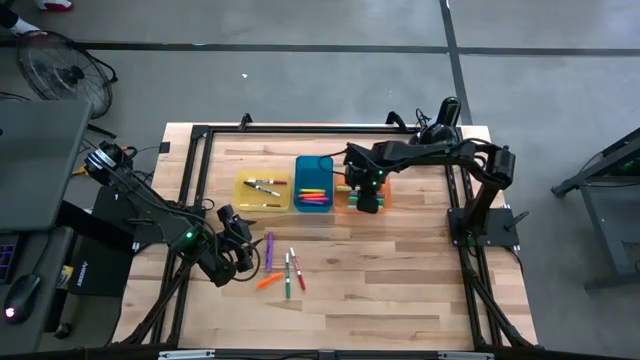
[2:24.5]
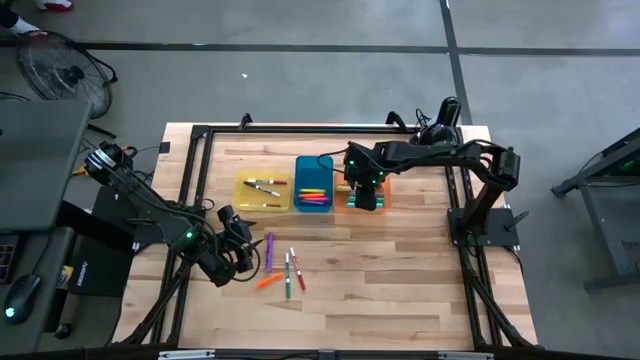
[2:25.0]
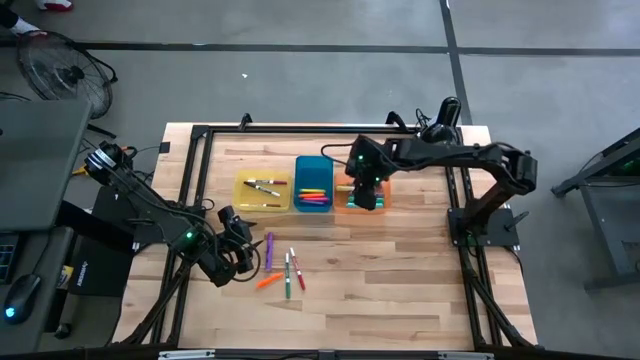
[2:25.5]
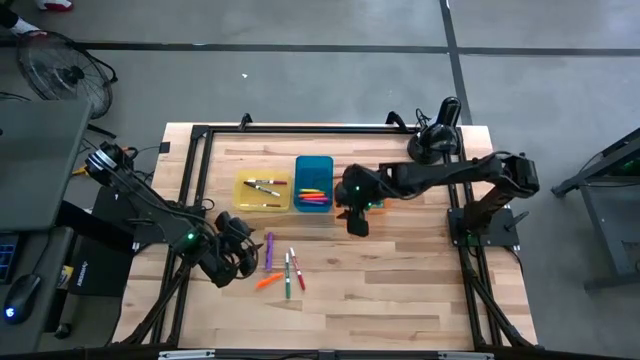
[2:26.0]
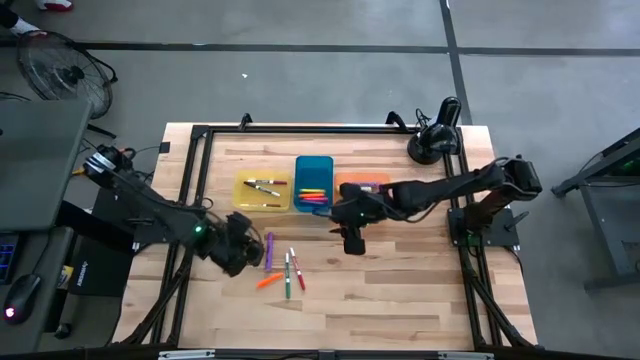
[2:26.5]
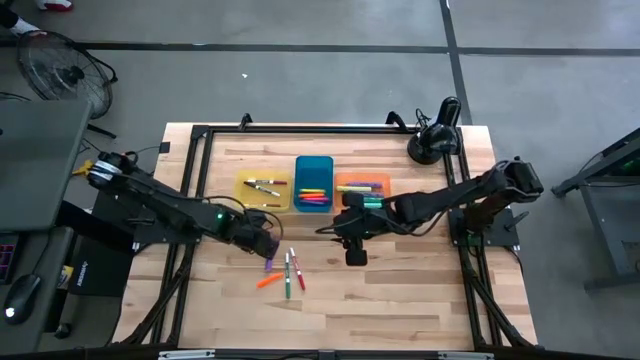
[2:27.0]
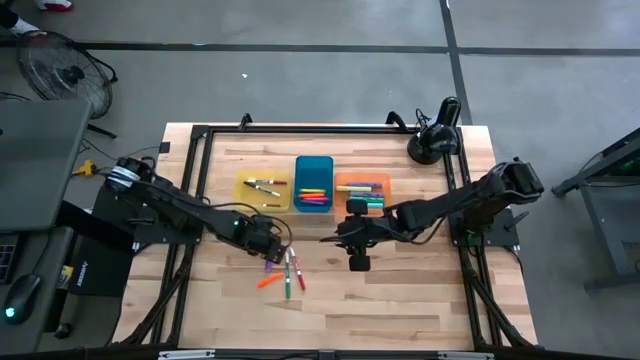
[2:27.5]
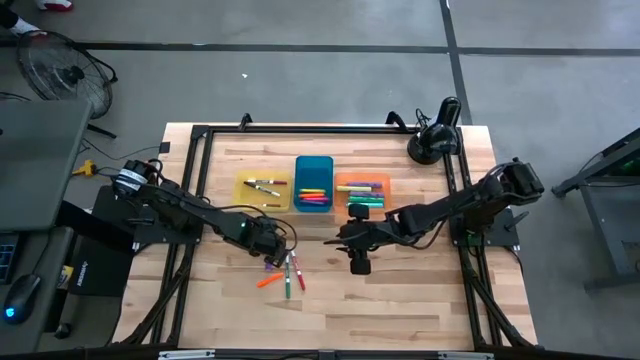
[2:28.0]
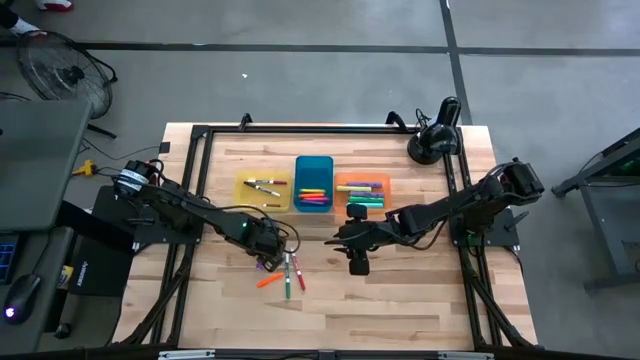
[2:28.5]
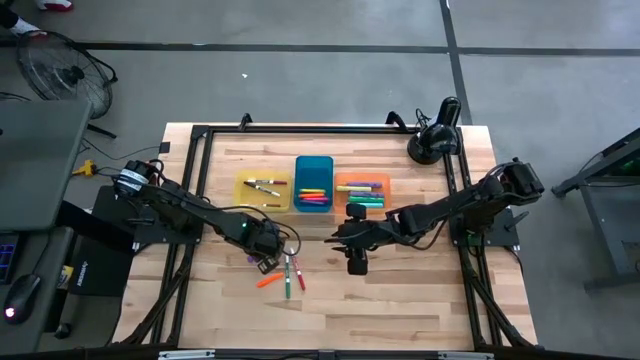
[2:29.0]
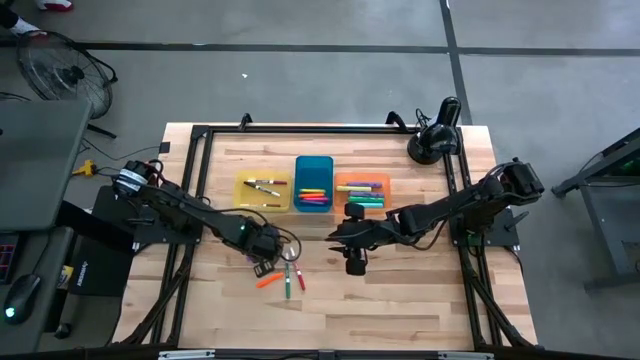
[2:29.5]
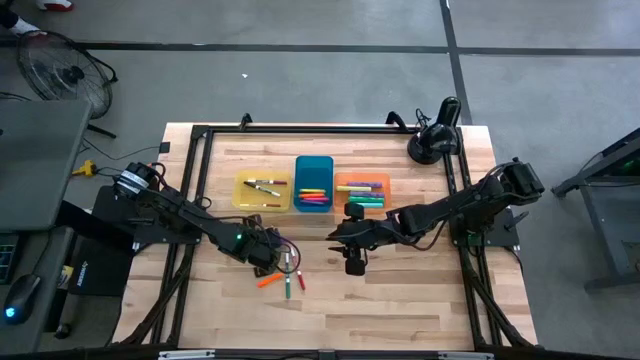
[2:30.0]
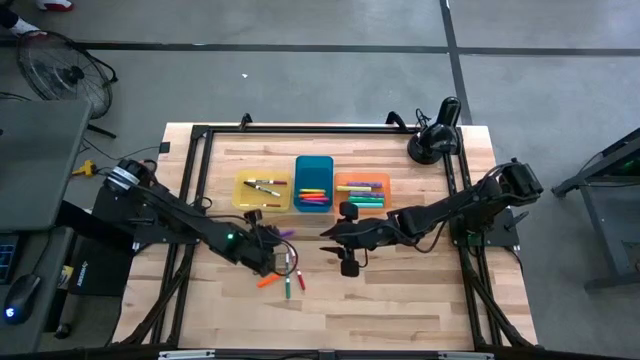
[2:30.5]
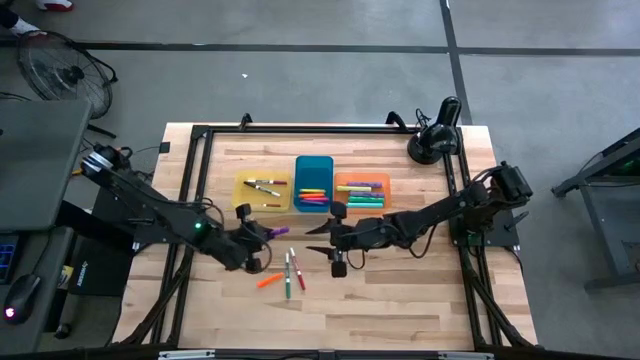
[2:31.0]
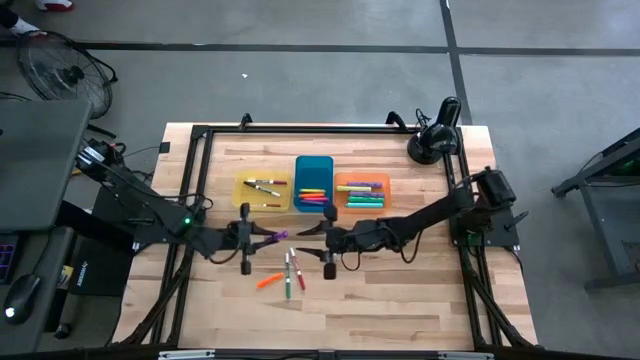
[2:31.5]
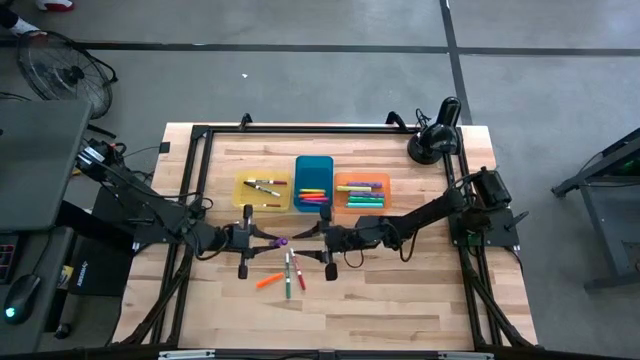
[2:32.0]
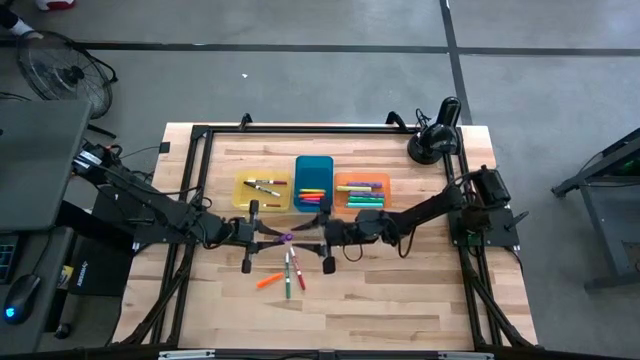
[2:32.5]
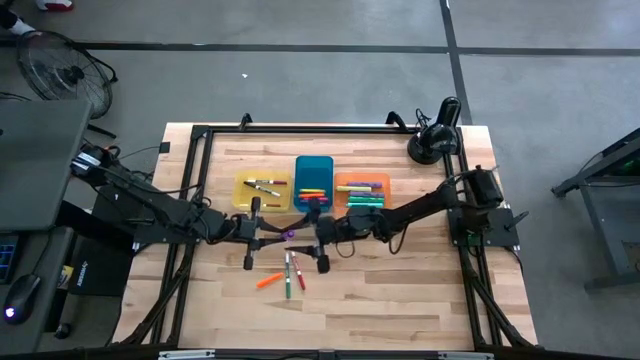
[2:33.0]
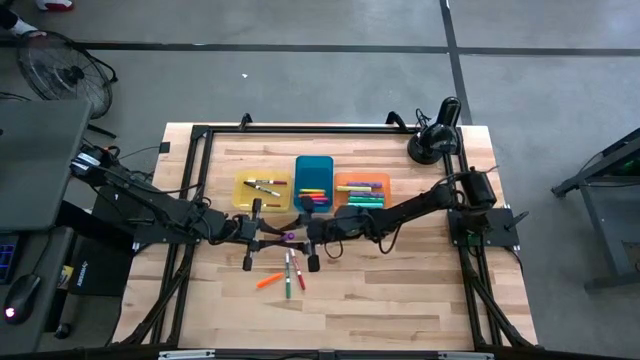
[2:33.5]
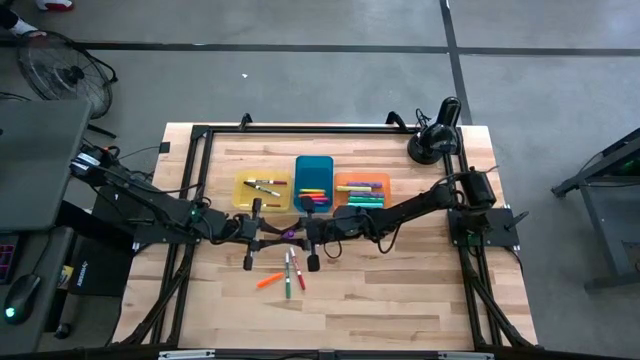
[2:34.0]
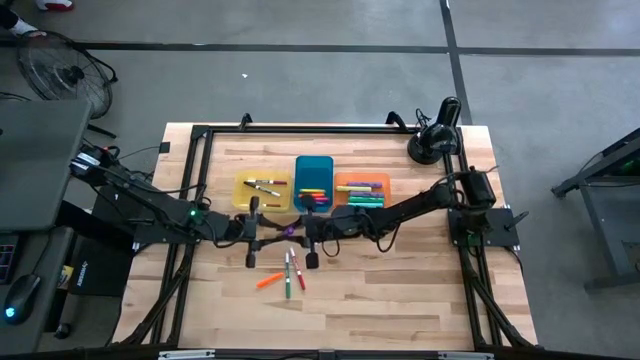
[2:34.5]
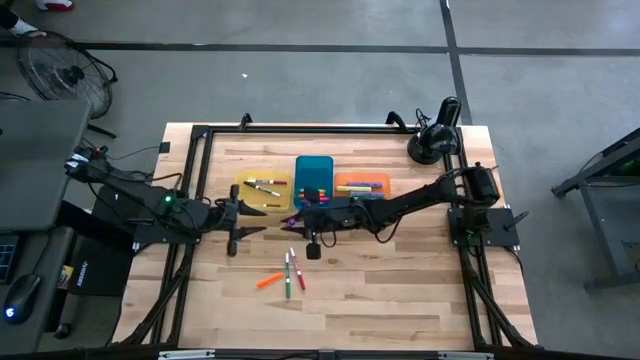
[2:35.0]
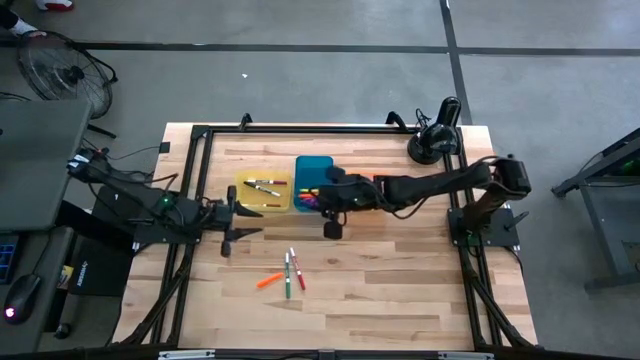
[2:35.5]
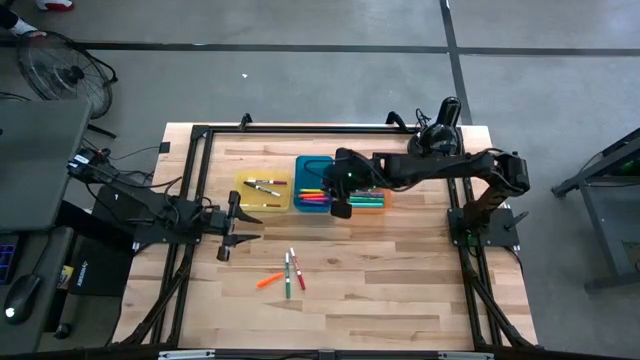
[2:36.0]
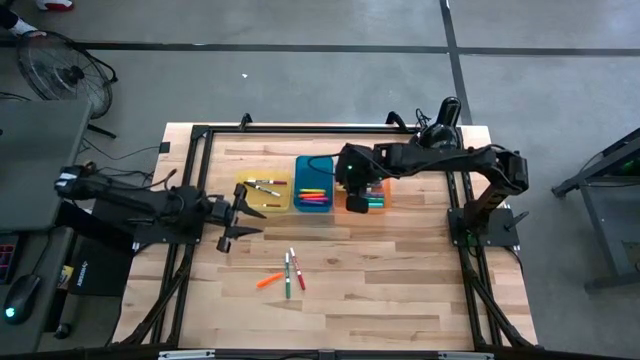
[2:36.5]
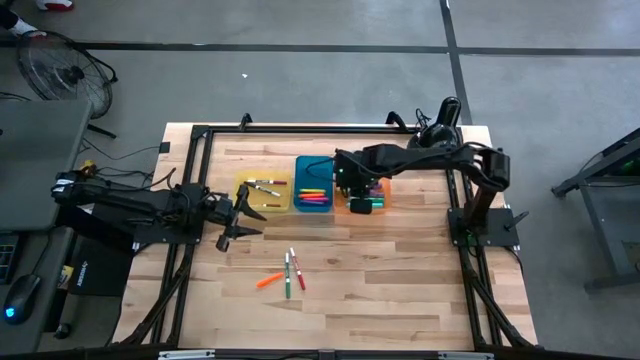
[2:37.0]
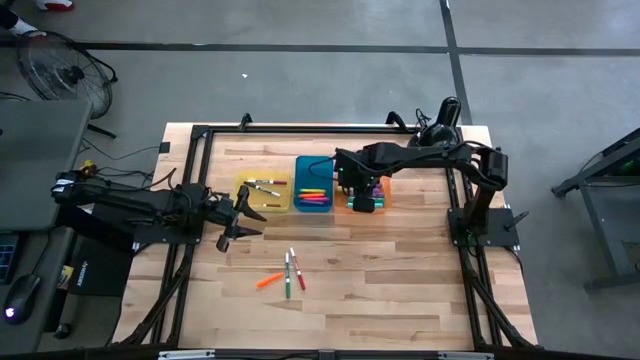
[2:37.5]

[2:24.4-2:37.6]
Task: Pick & Place Markers
Put the dark violet highlighter into the orange bin

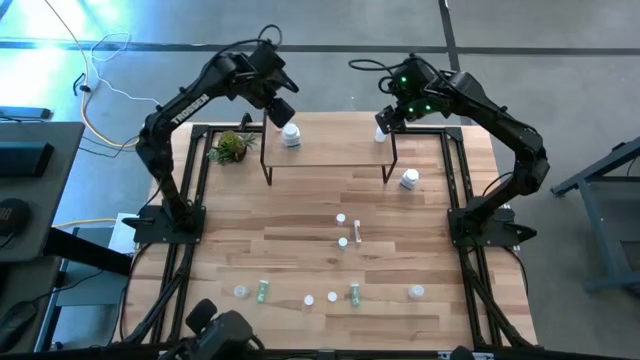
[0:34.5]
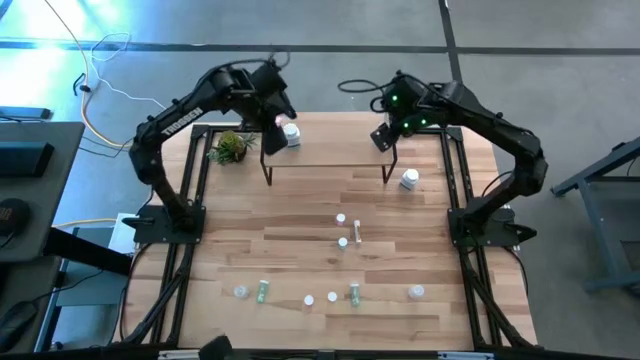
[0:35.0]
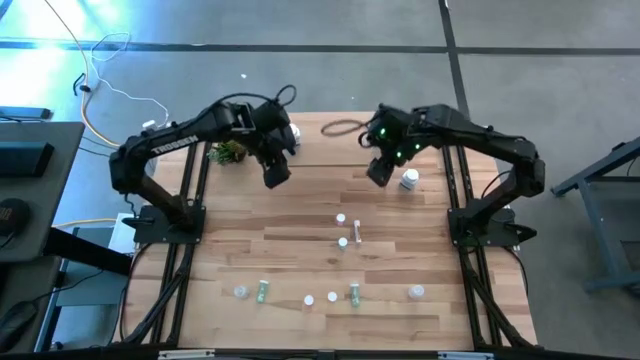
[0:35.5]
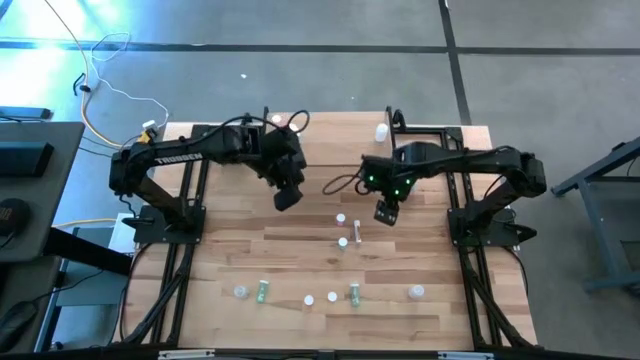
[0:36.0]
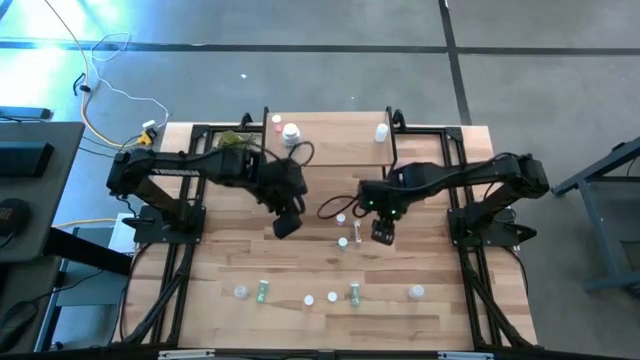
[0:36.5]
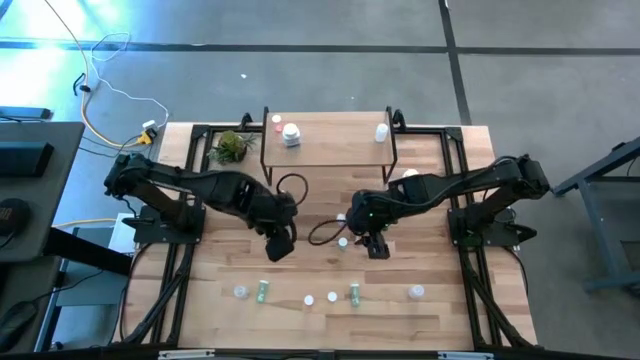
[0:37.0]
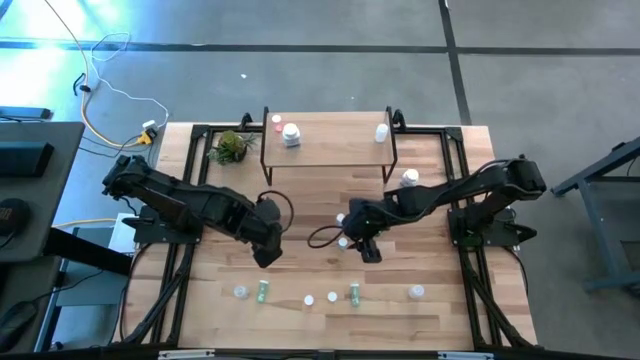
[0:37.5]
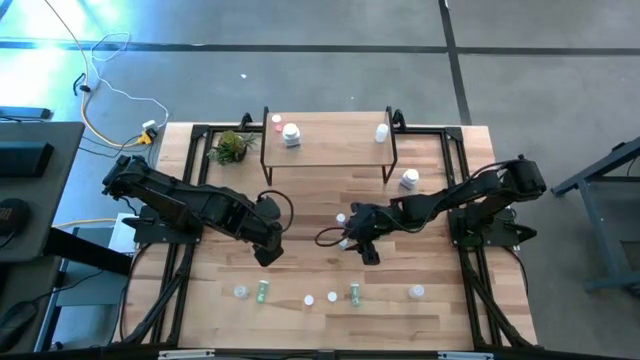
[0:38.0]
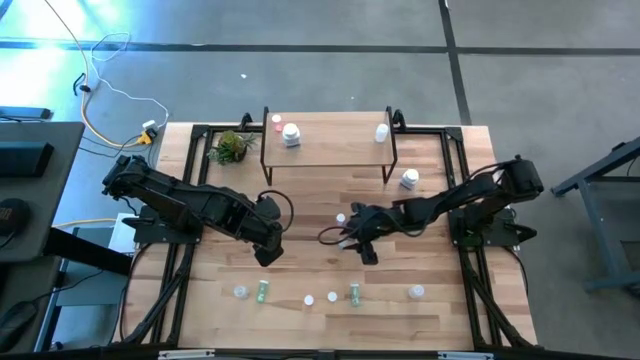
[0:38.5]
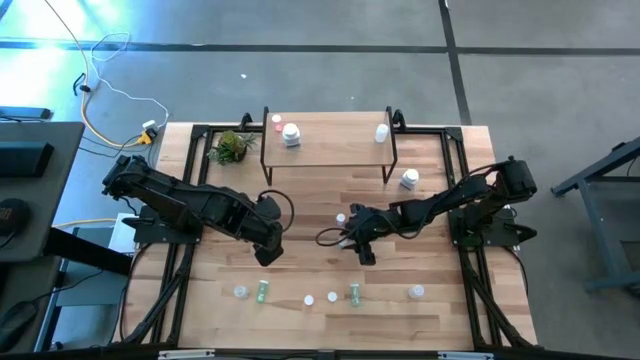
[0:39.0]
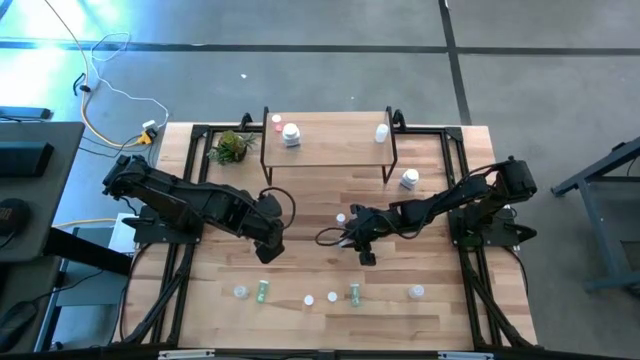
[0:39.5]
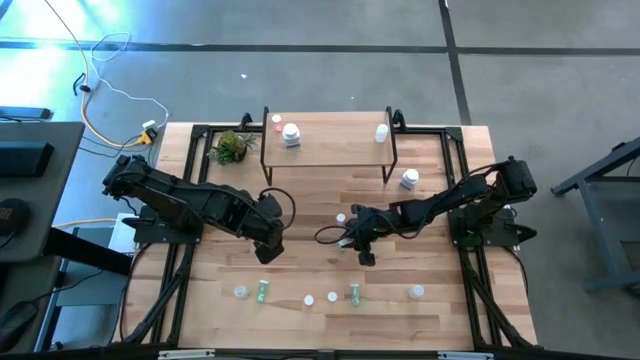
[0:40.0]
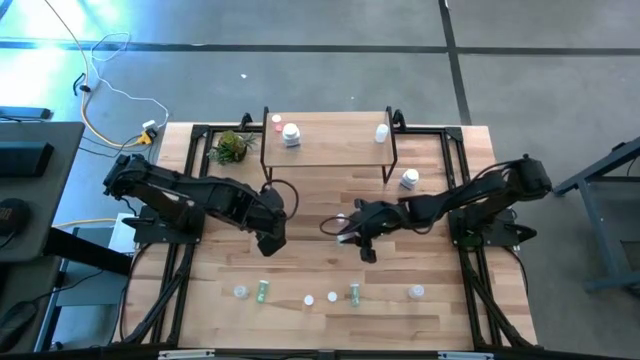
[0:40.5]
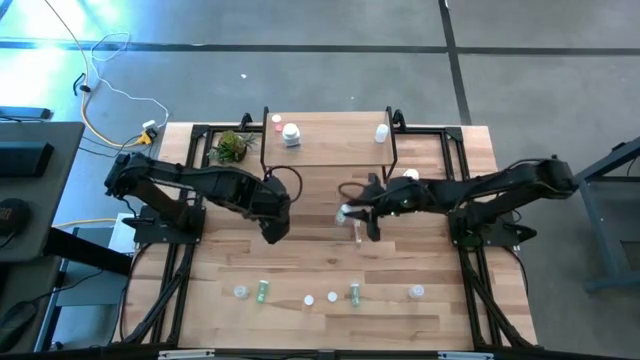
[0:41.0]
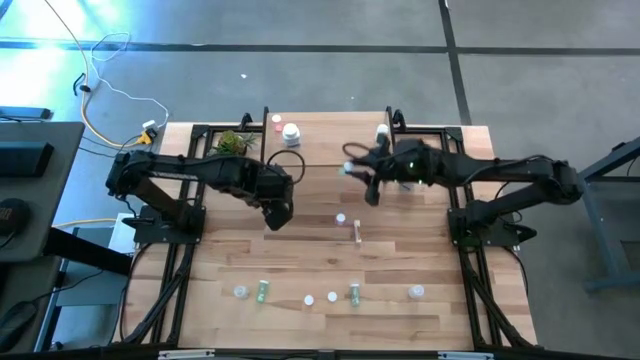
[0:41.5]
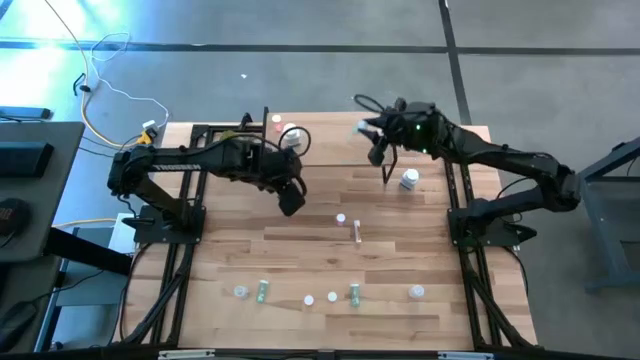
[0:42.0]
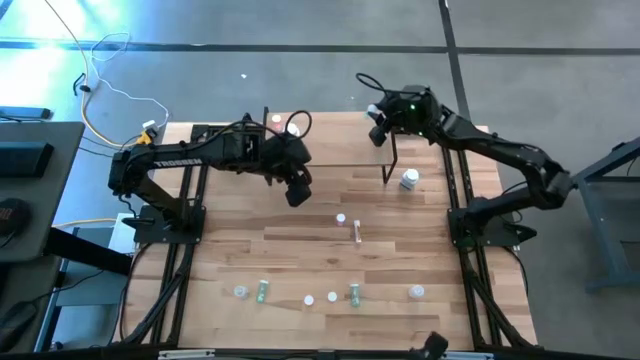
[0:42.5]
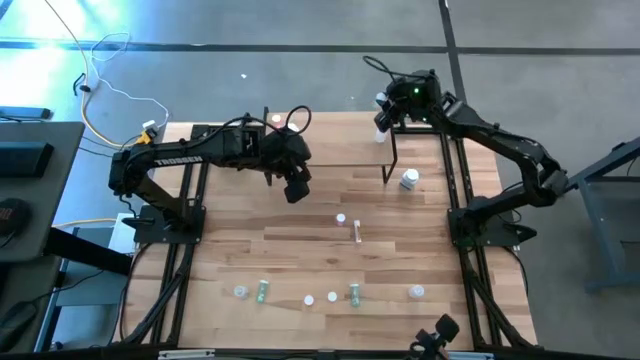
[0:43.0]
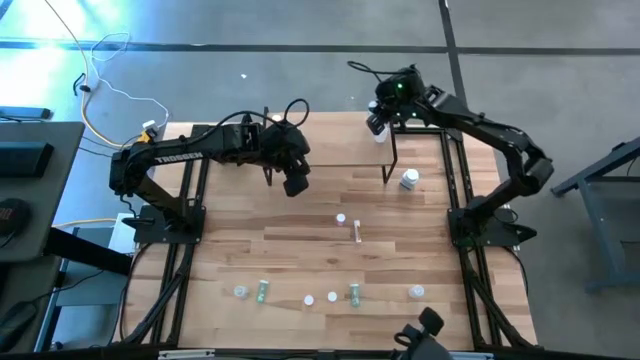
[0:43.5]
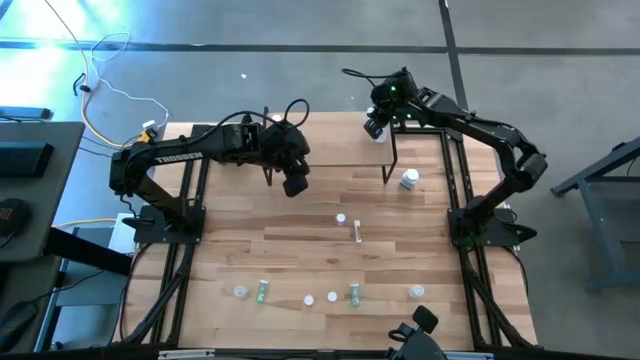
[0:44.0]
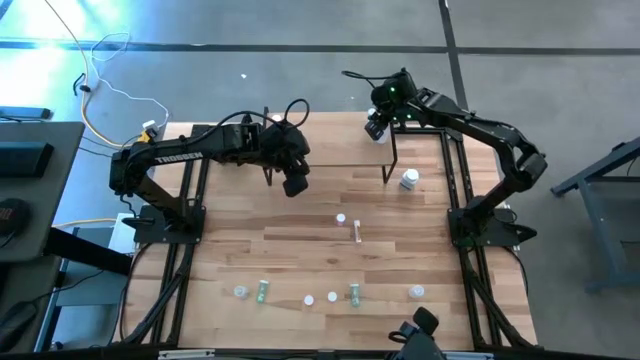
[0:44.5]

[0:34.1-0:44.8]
Task: Pick and place medicine bottles onto shelf by color
Put the top green pill bottle on the shelf
